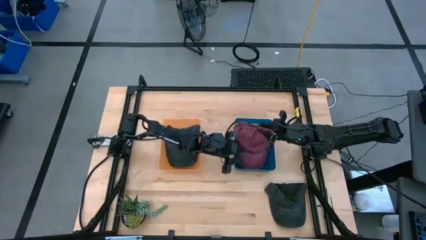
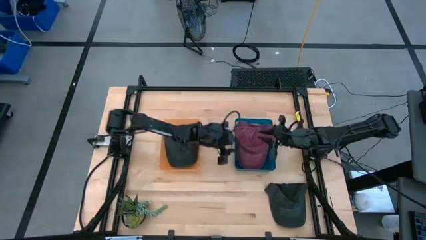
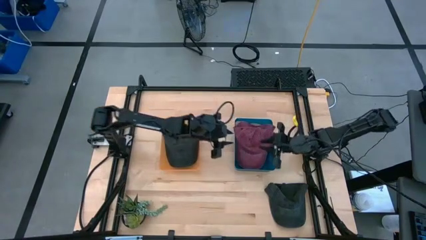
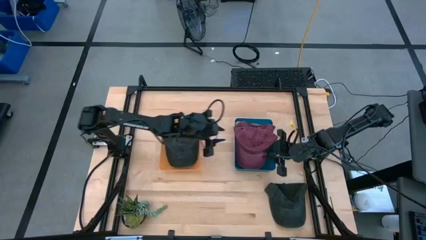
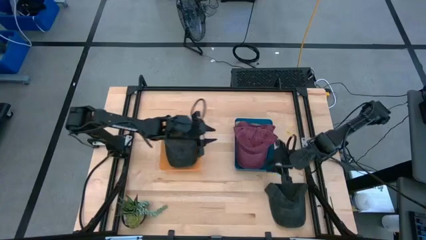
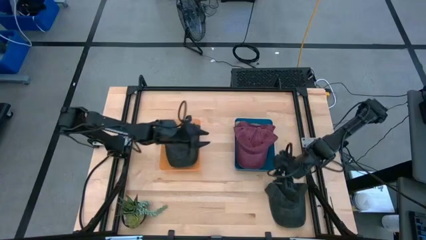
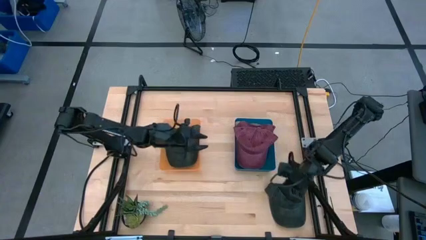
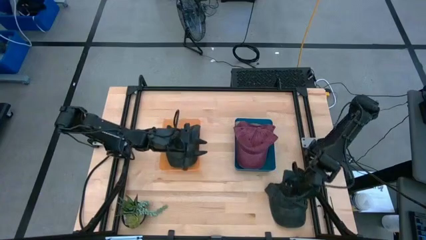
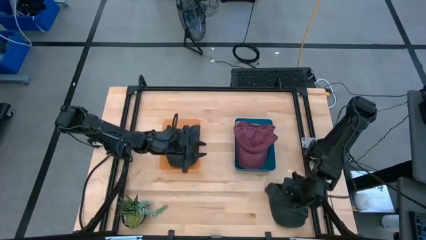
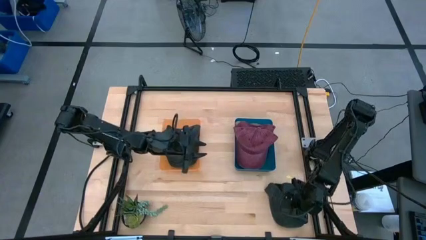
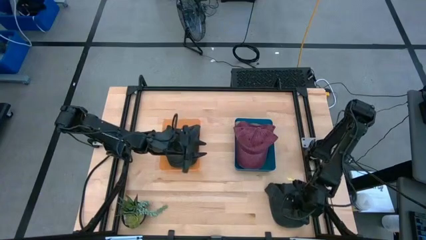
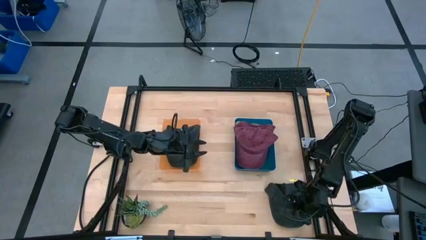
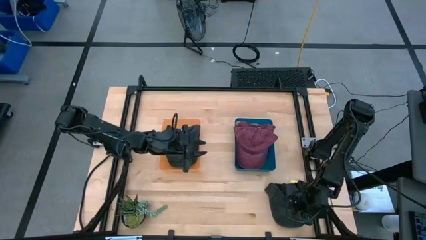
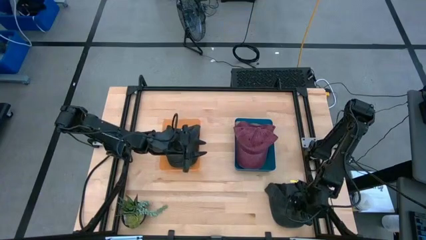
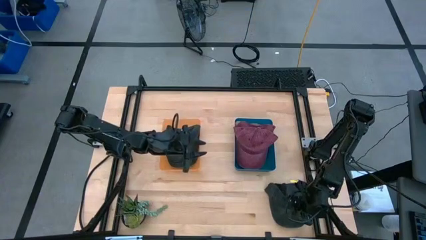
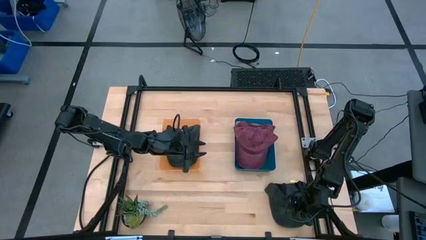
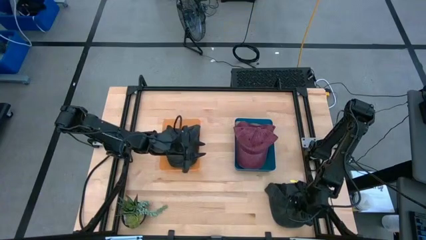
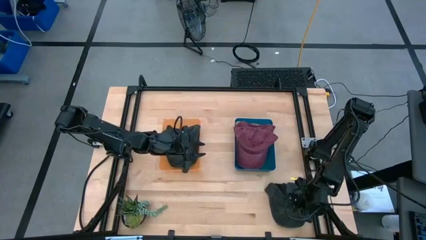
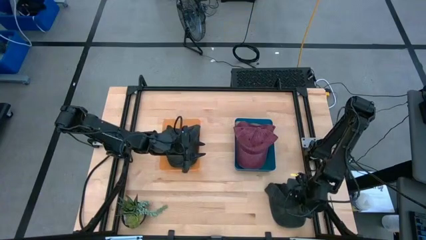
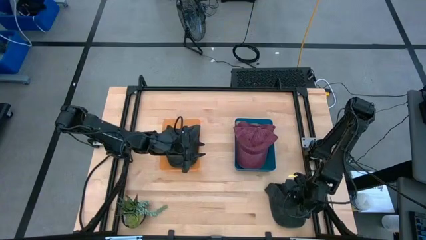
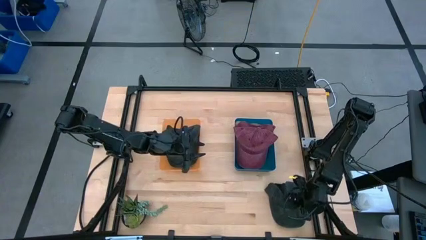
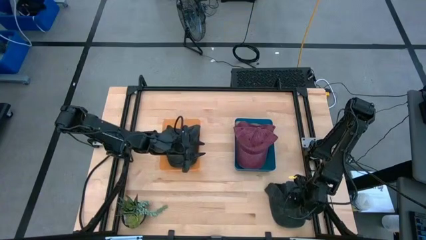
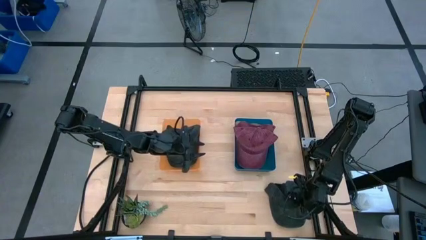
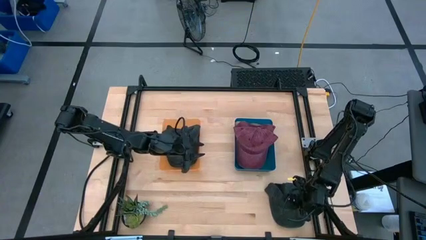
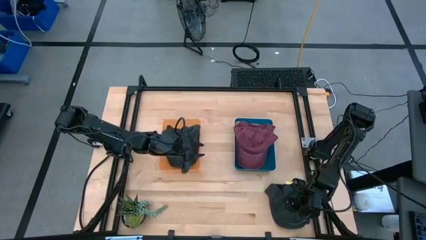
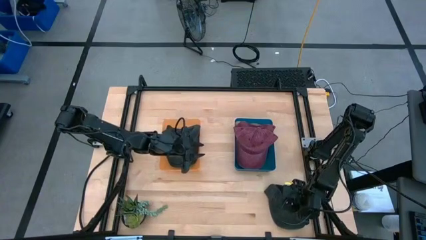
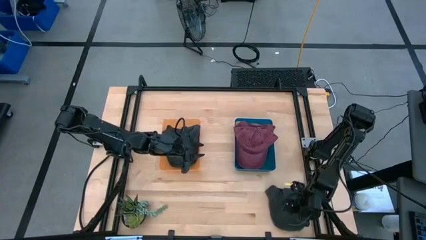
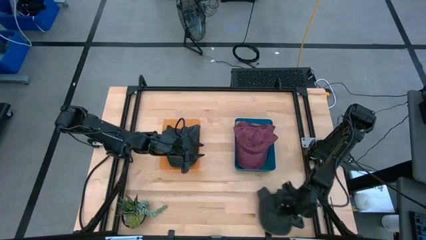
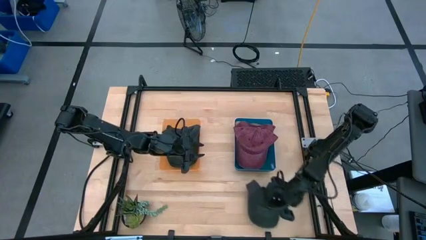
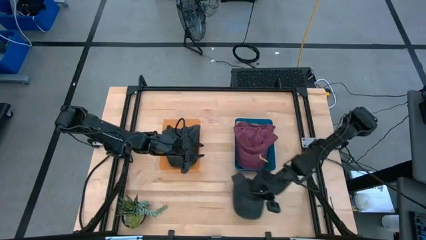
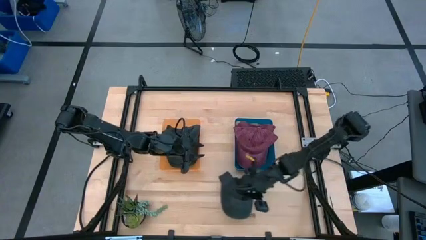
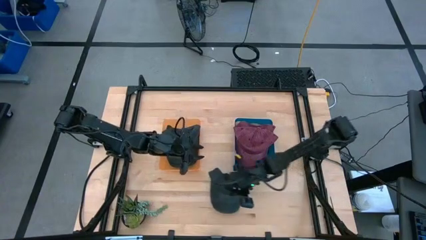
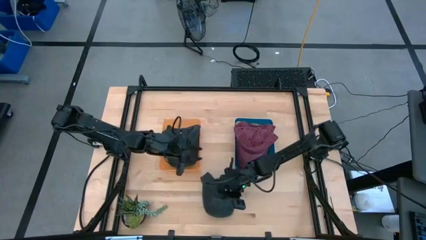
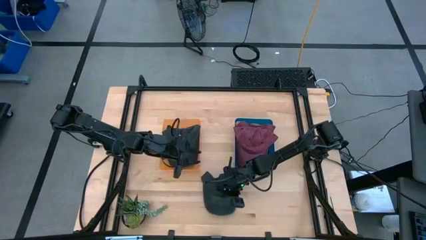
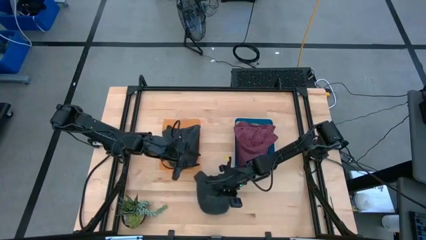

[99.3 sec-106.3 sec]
Task: Pick & Place hat
Move the black cap on the middle bottom of the table

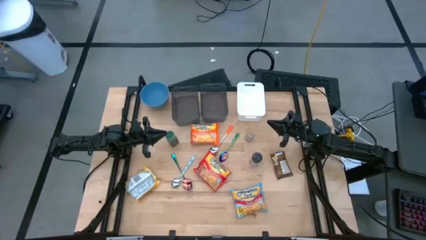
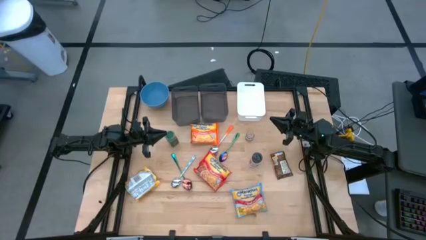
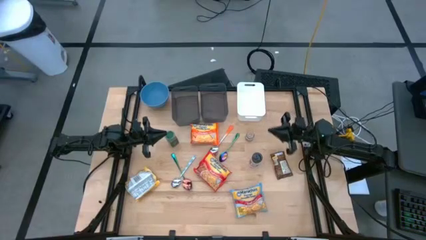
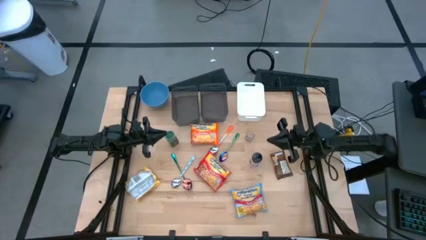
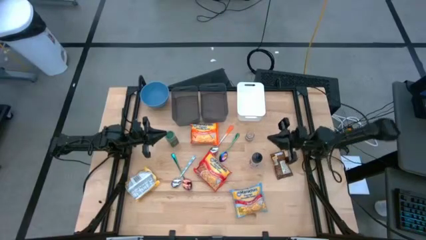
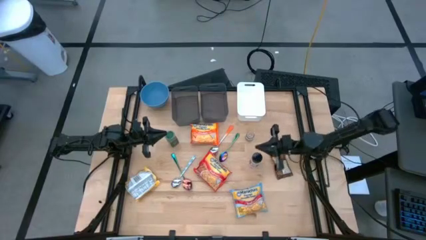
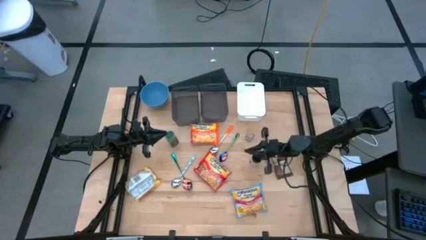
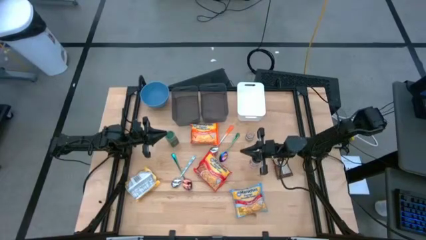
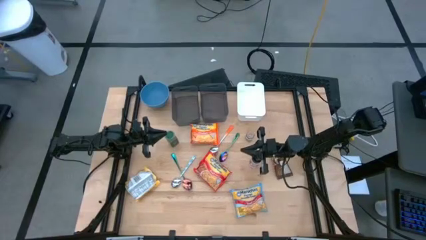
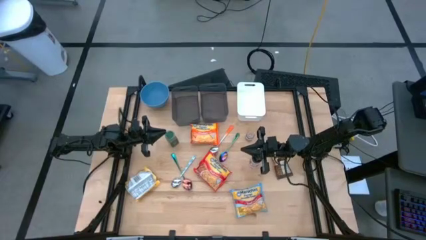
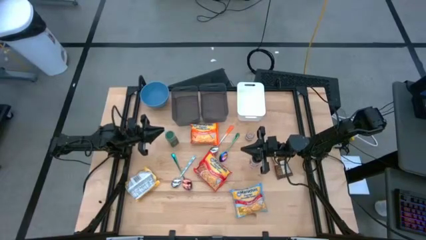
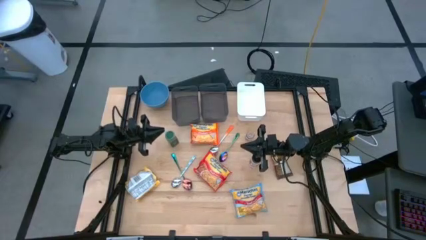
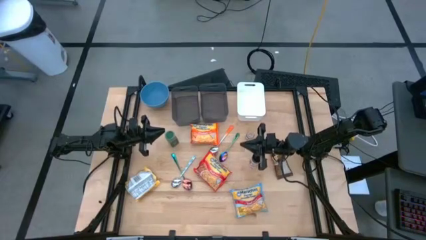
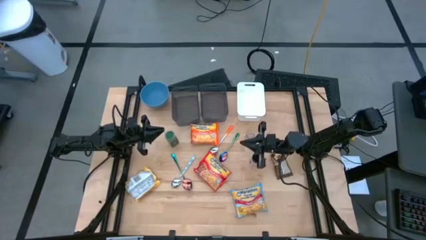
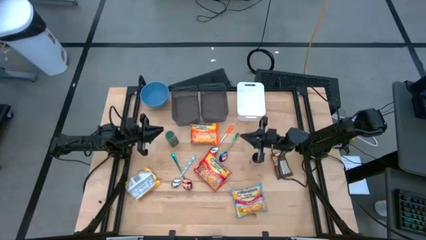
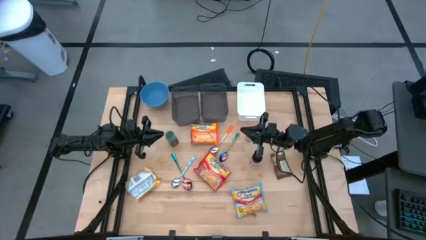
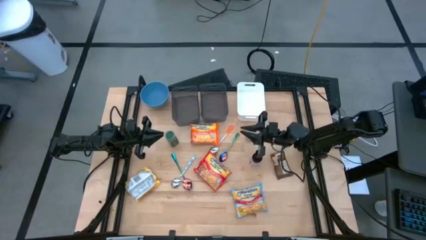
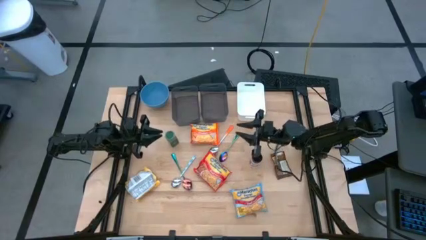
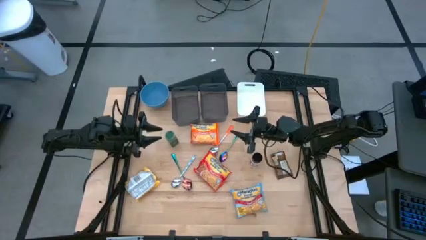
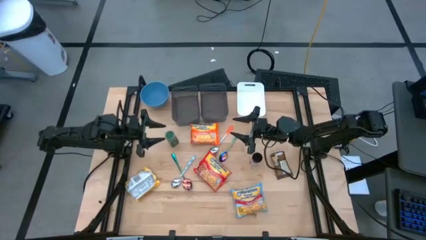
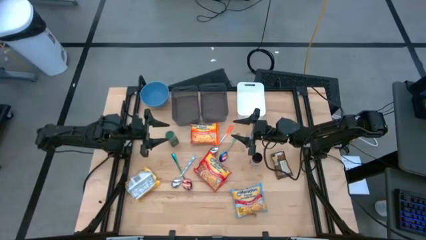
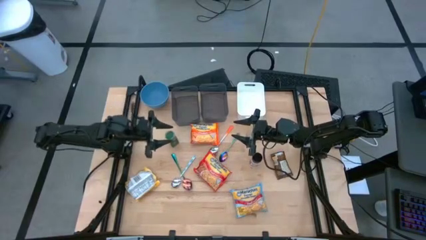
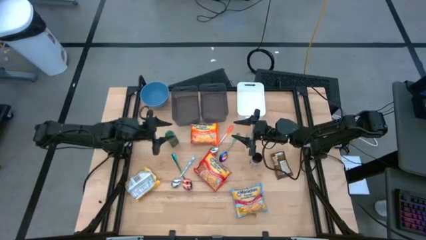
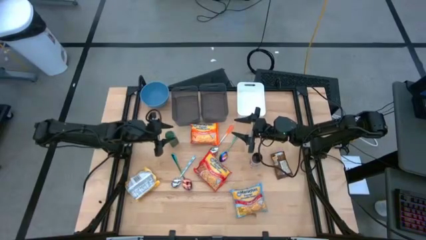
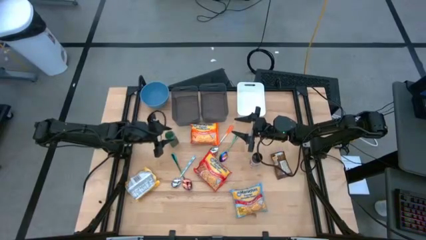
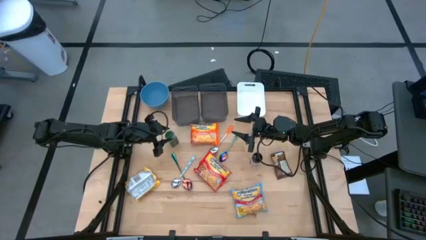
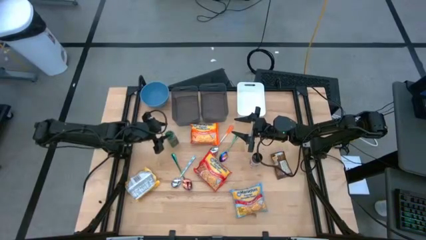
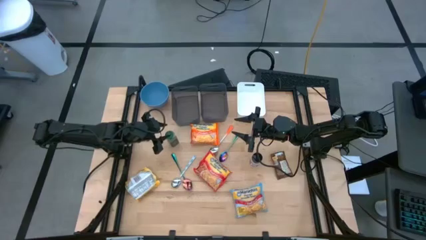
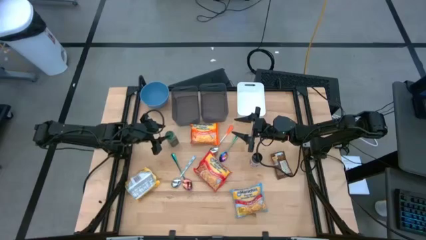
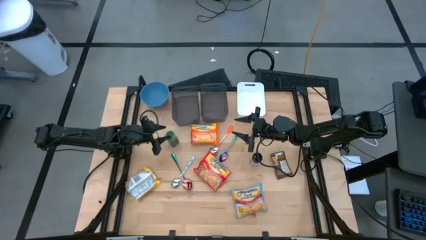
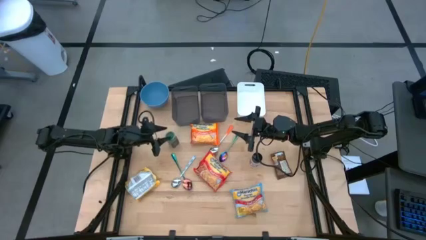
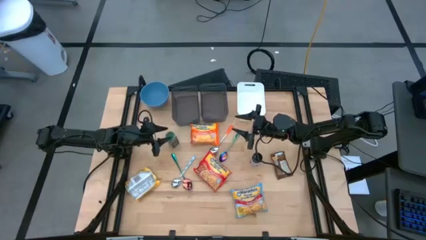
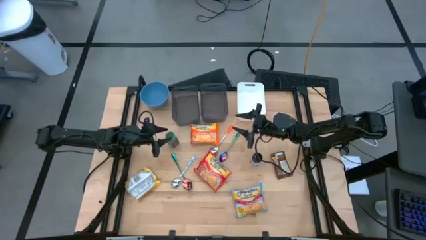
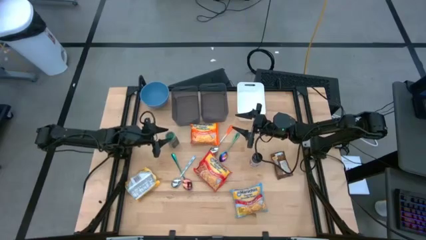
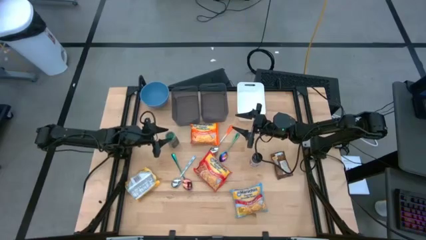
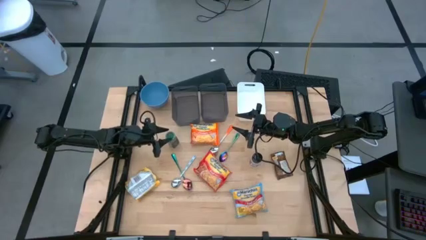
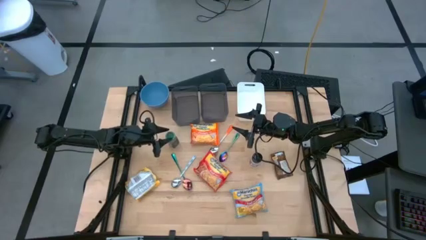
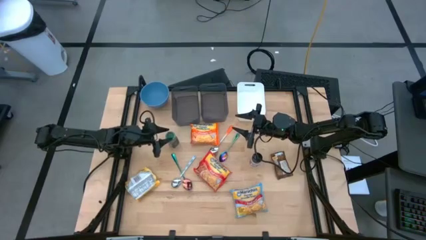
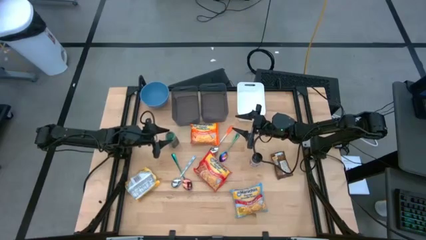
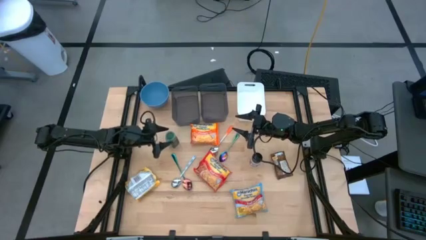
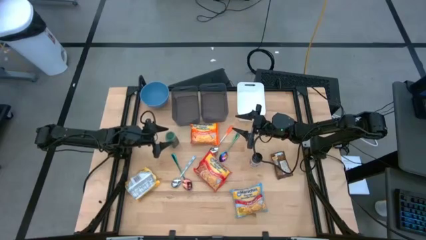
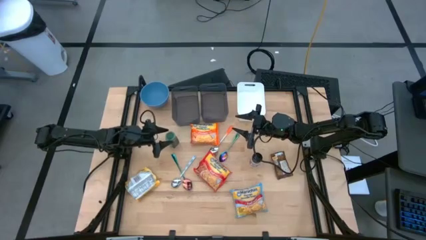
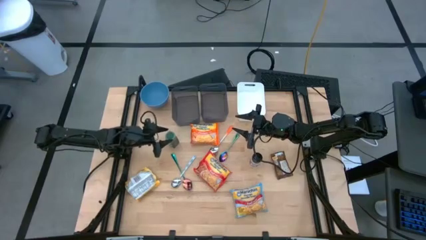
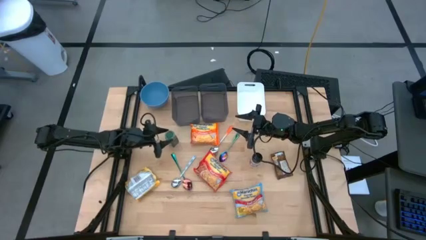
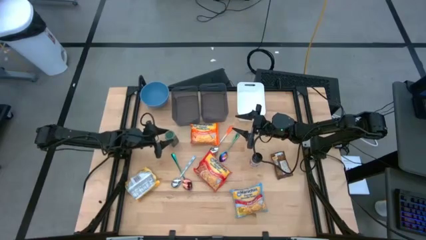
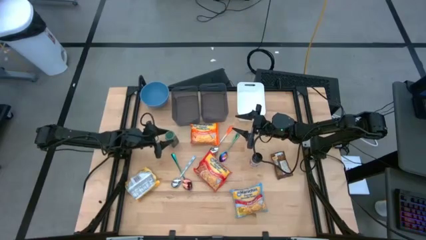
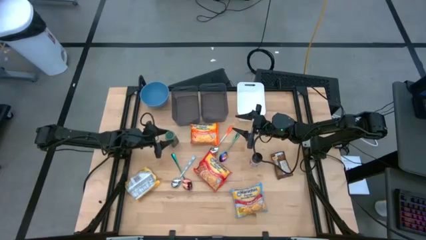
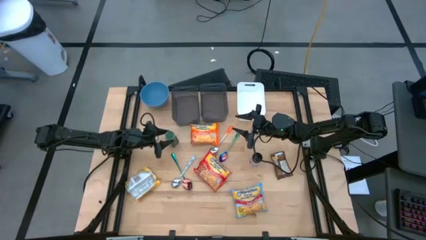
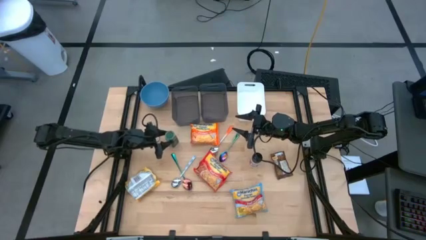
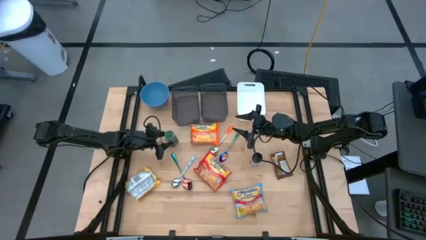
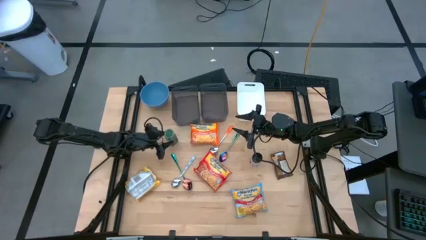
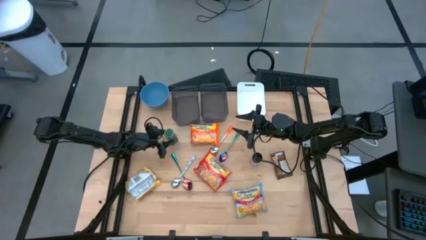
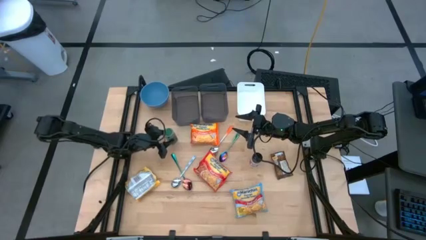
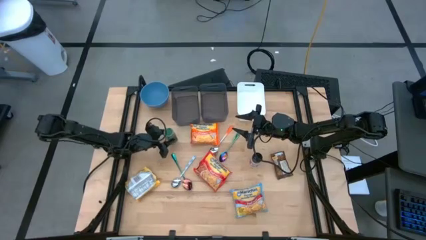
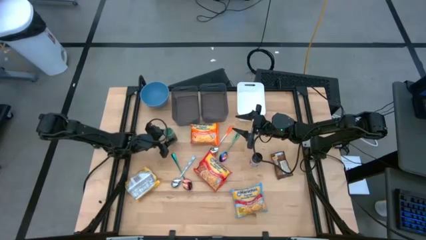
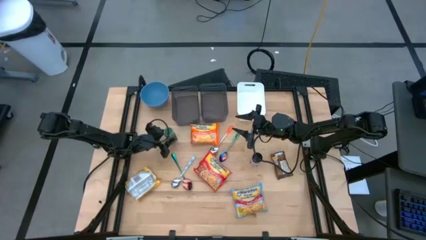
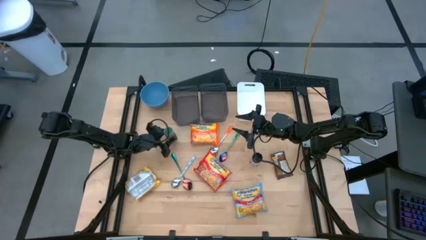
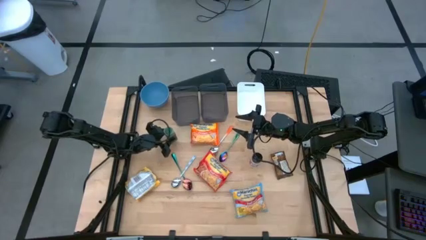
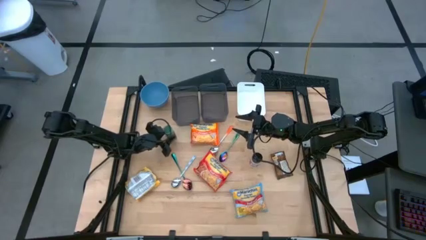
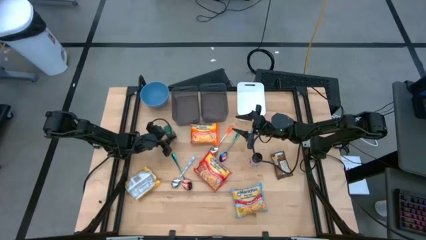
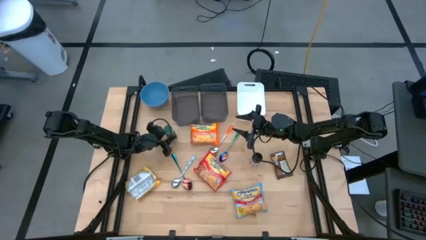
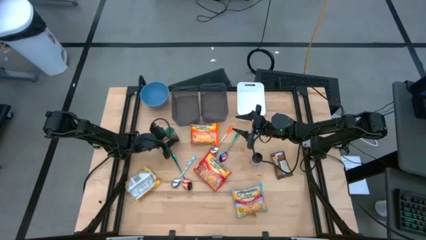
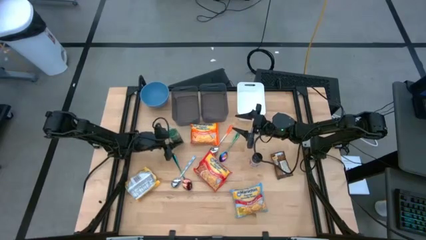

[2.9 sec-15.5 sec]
Task: Pick & Place Food Item
Put the green seasoning bottle into the white bin
